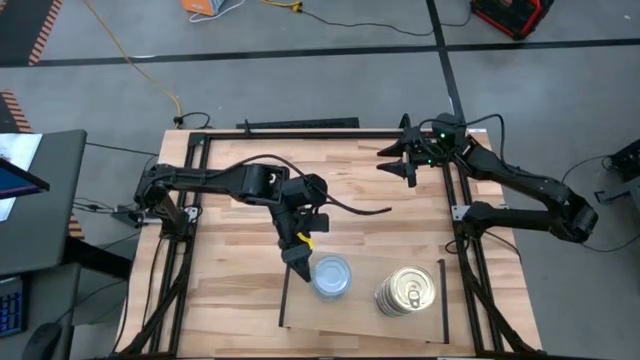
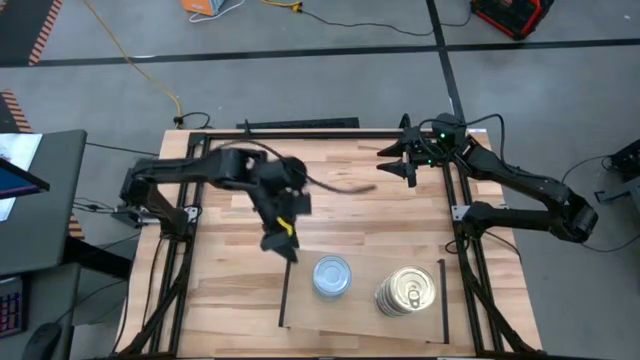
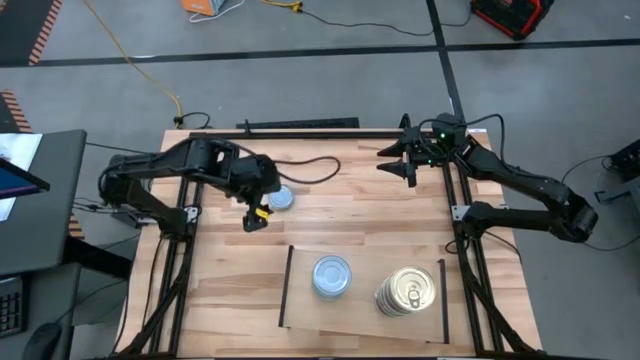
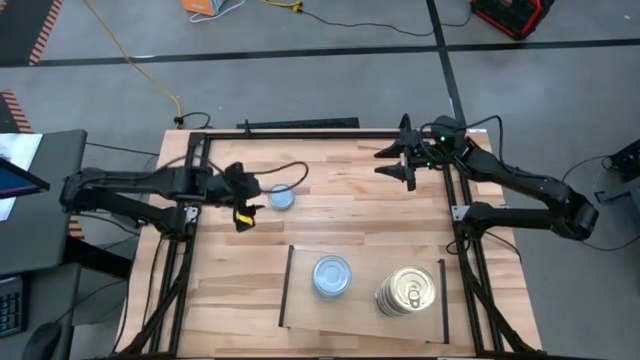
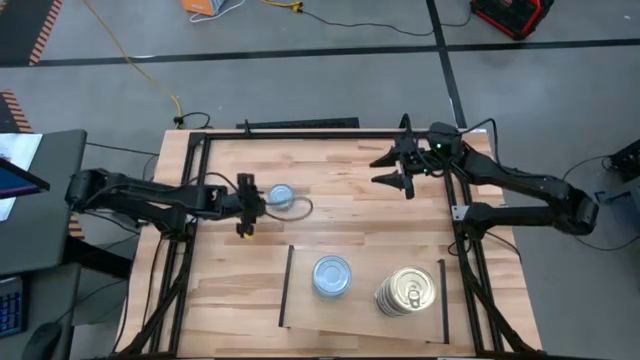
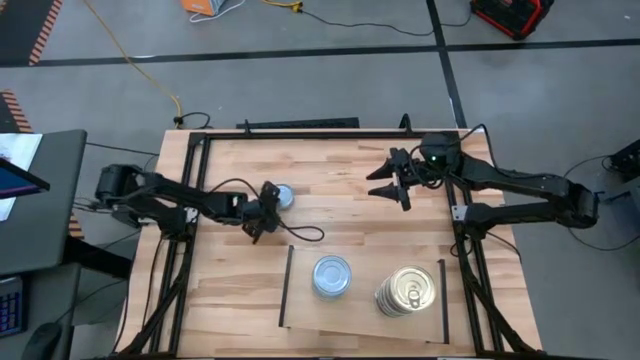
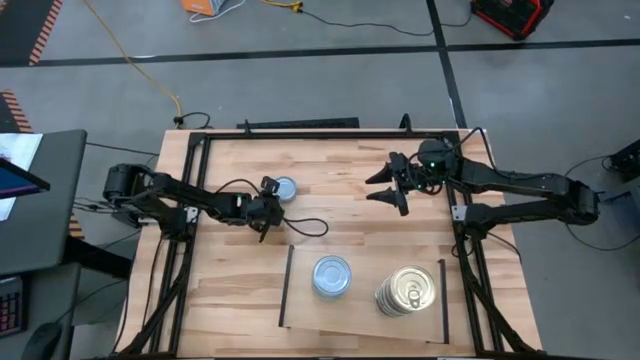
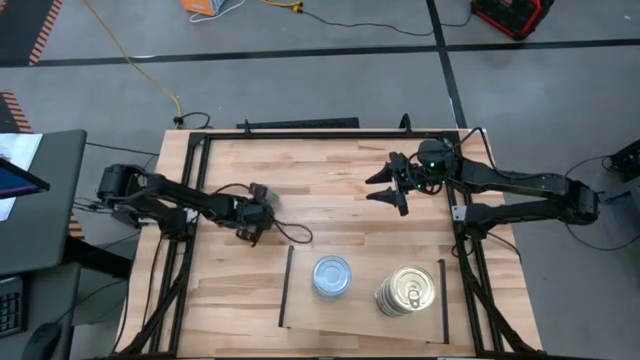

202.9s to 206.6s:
Task: Stack canned seafood by type on shelf
Stack the green tuna can on the top of the green tuna cans on the shelf

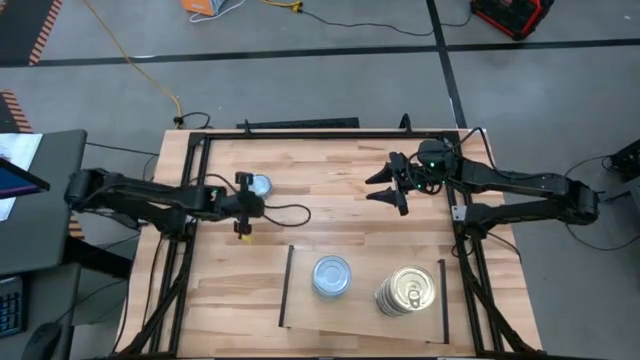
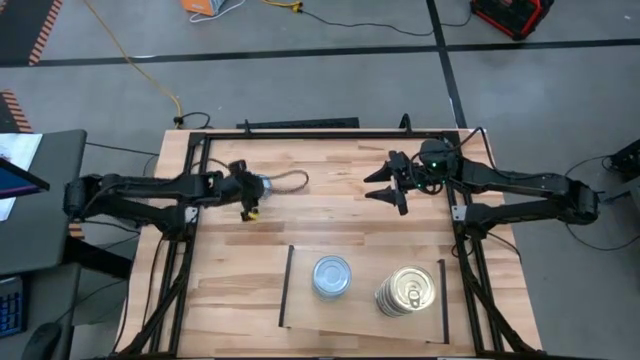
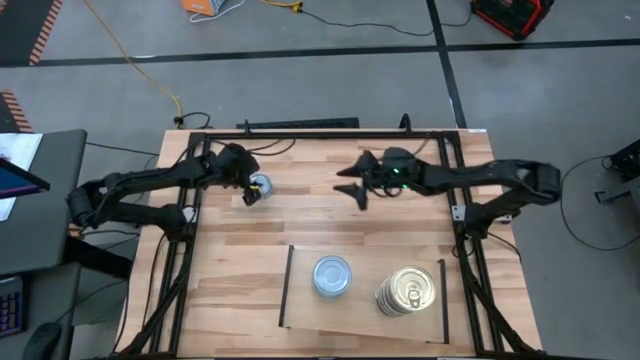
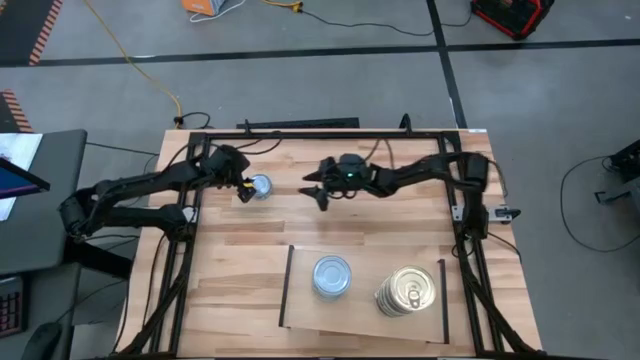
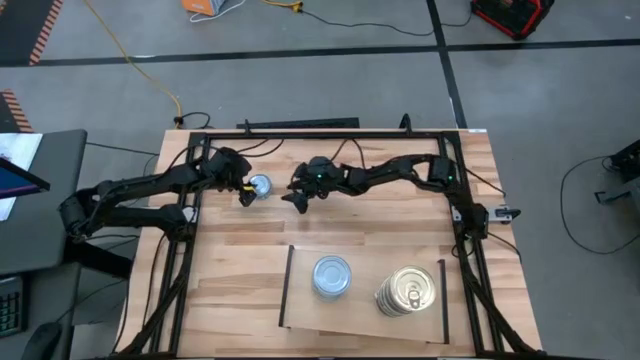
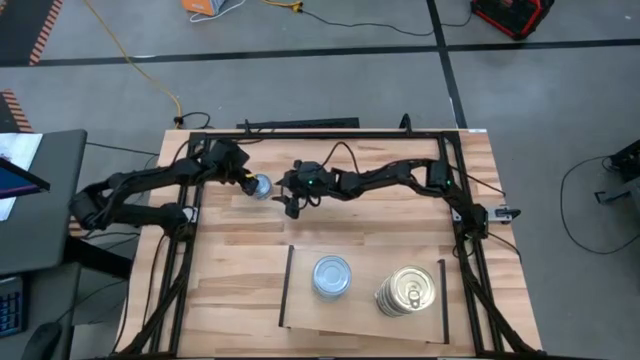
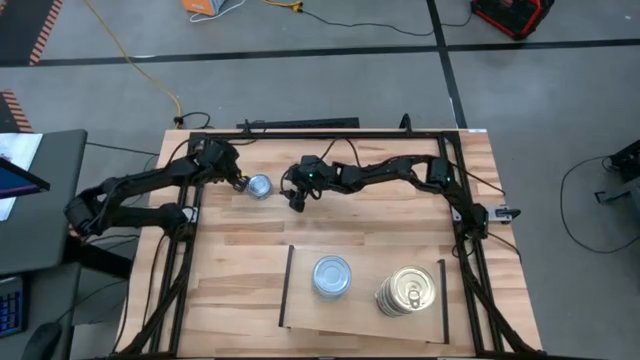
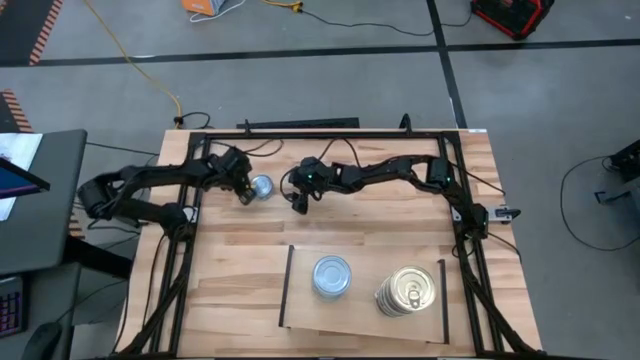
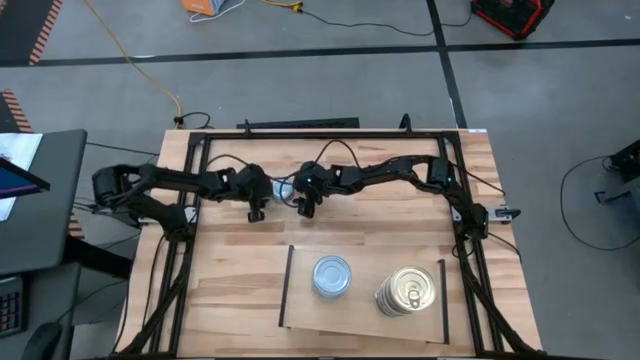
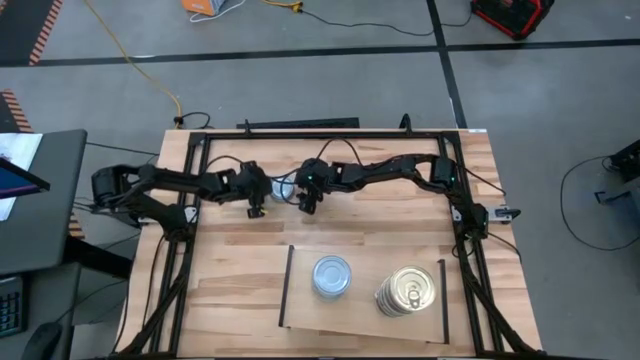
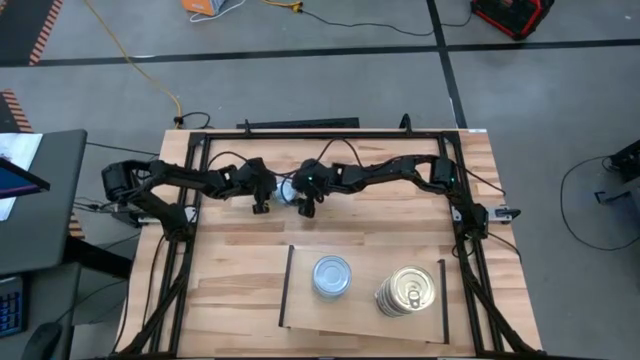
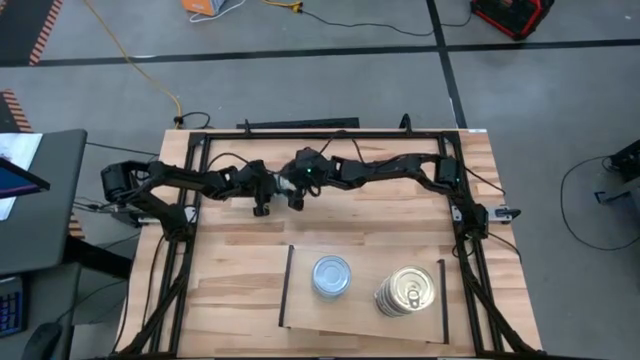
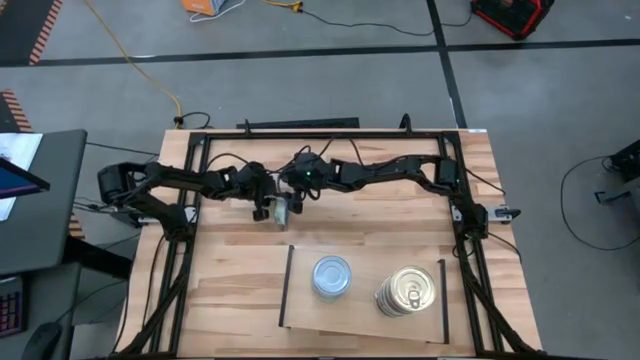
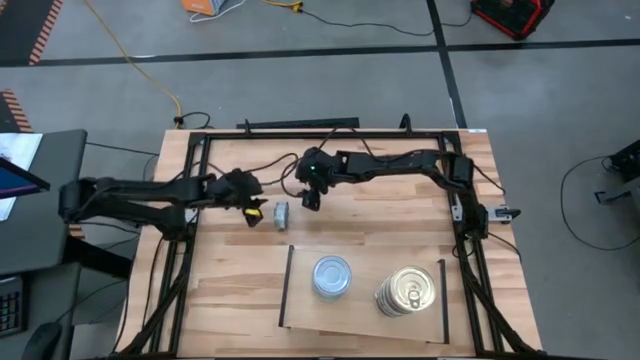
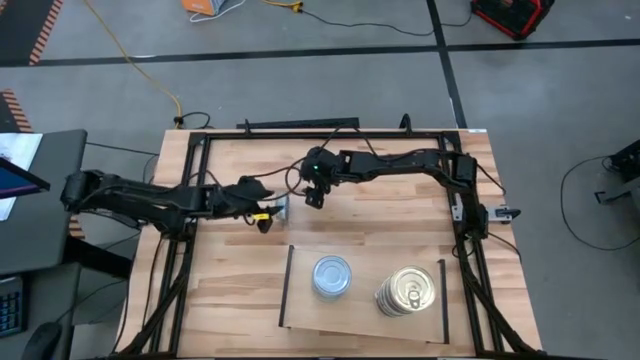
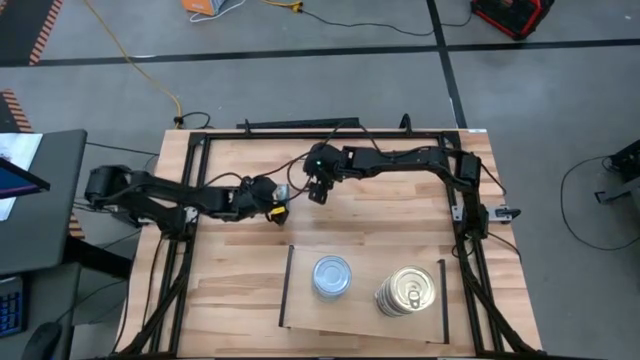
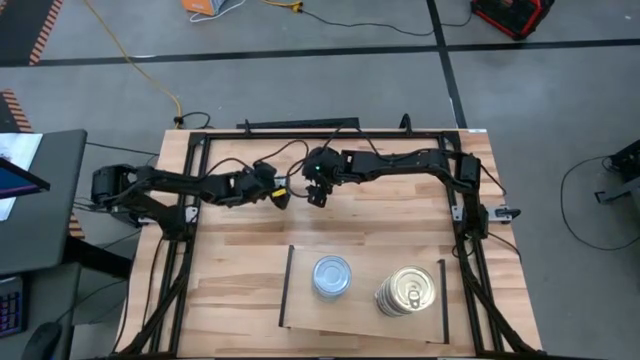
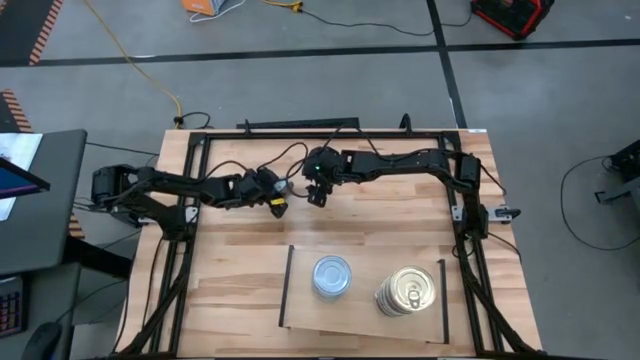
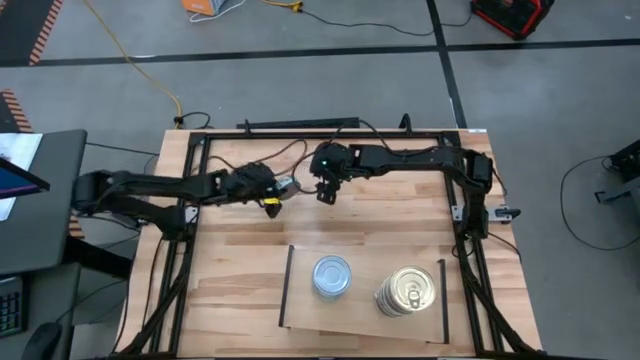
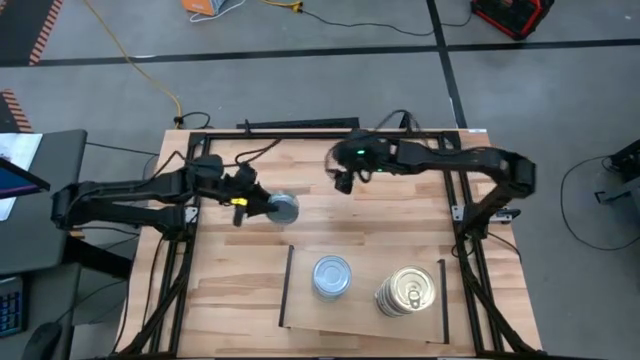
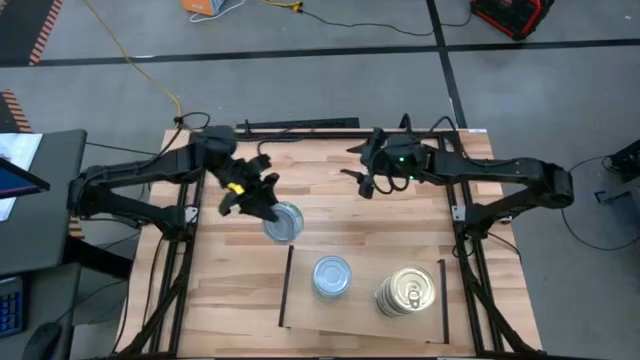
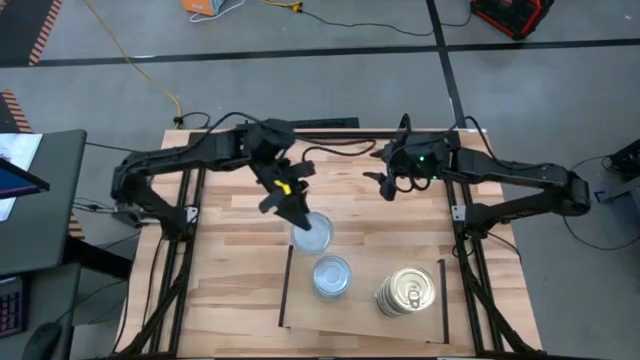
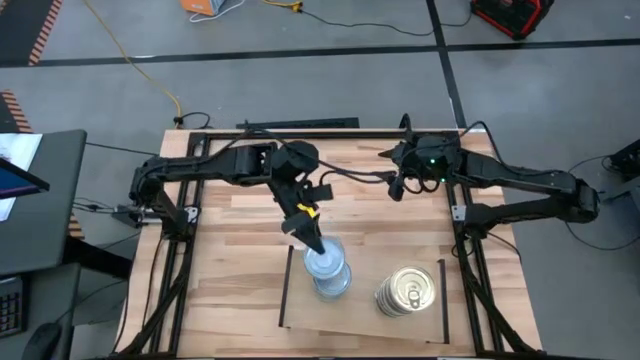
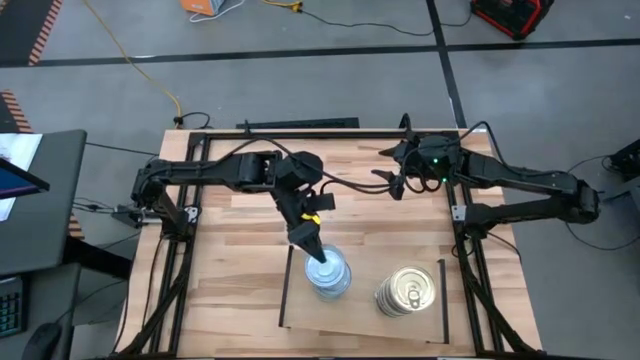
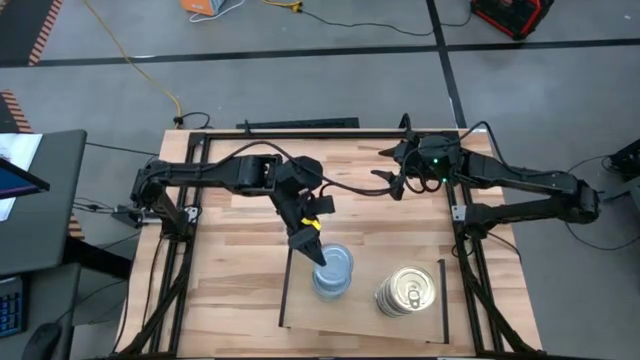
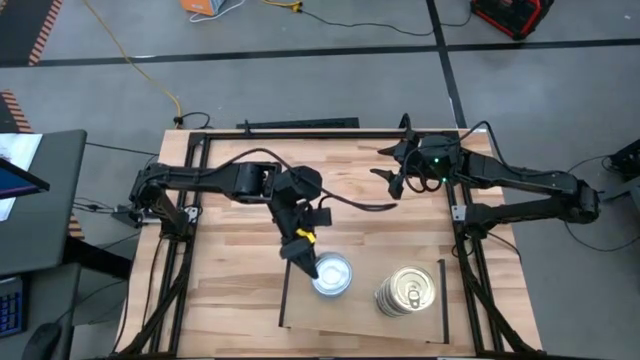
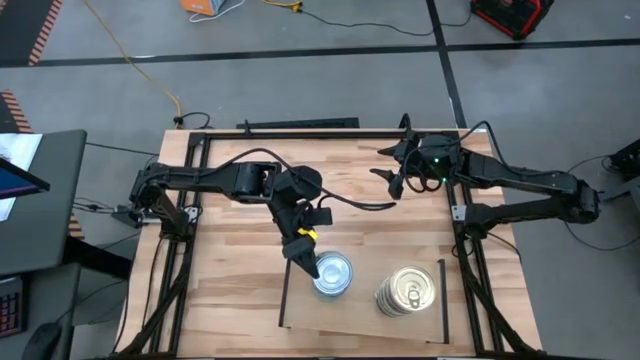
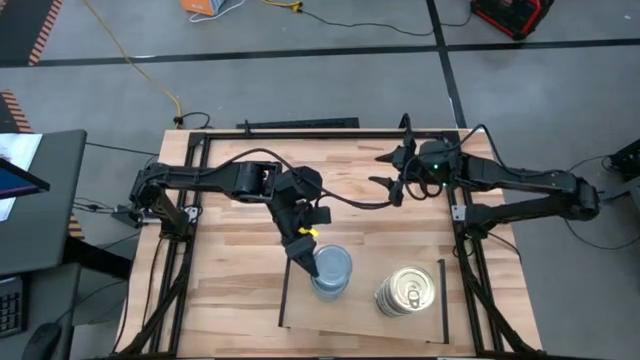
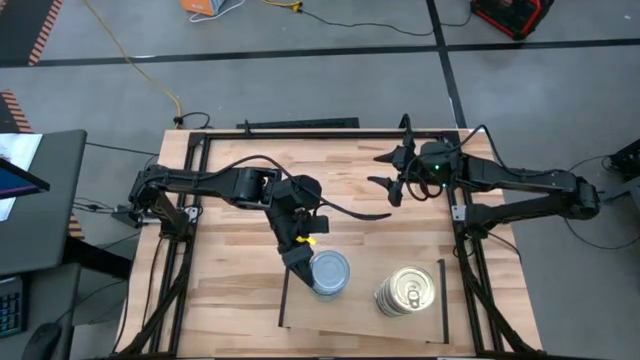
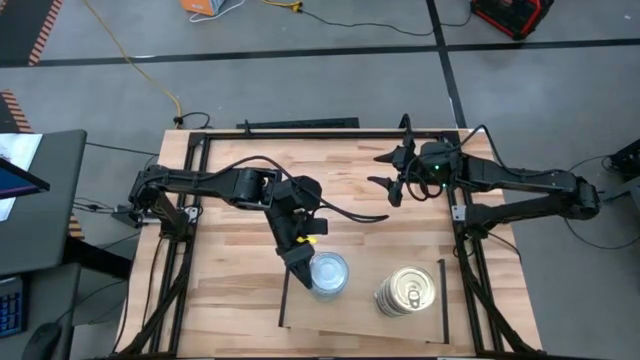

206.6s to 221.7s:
Stack the green tuna can on the top of the green tuna cans on the shelf

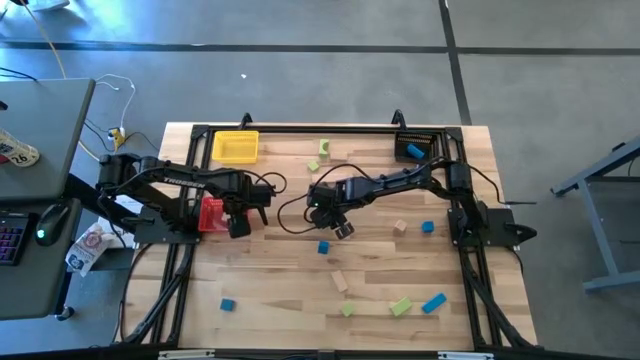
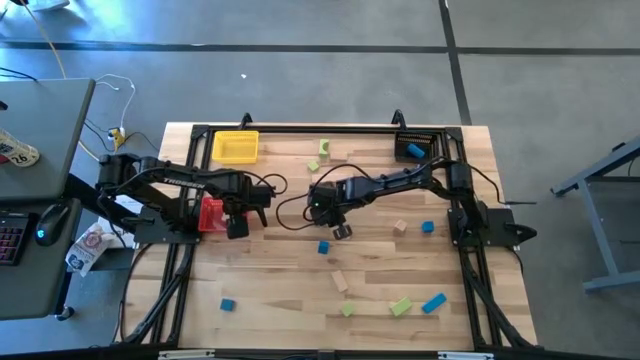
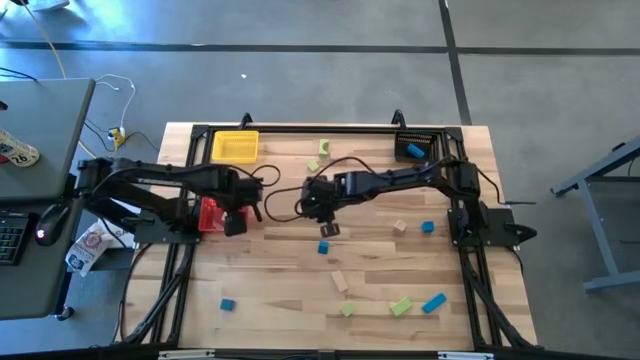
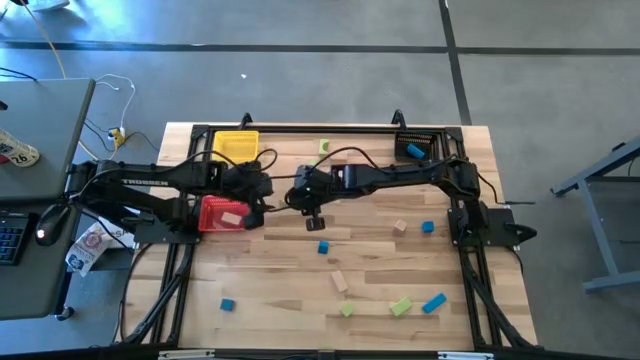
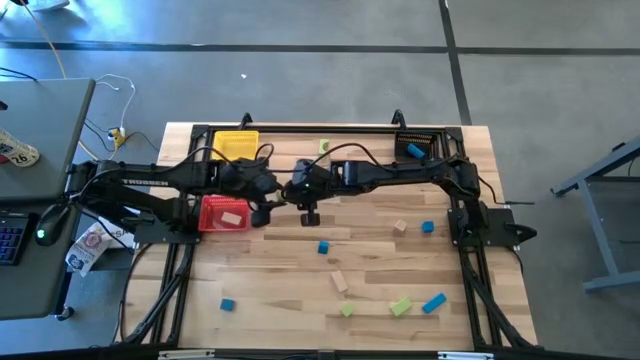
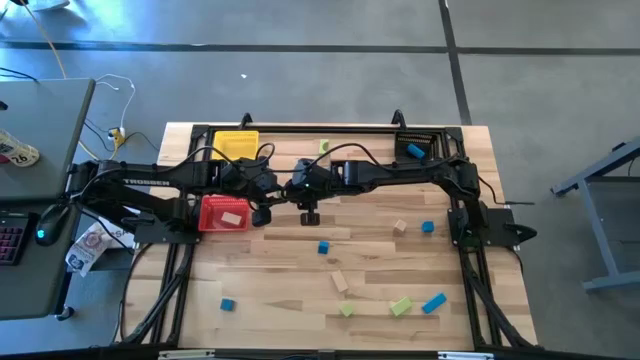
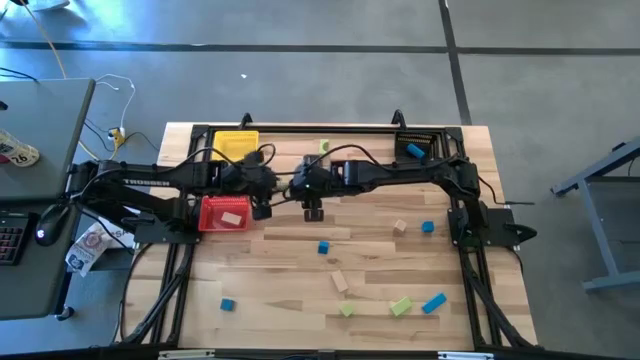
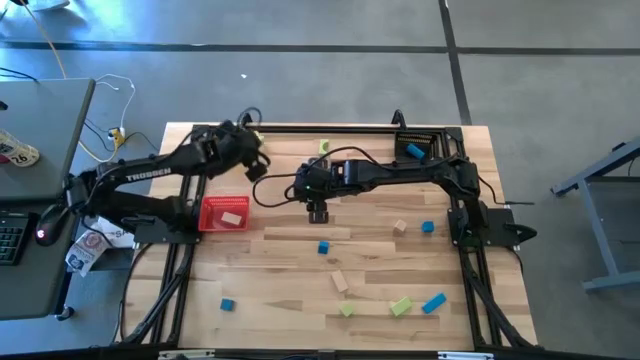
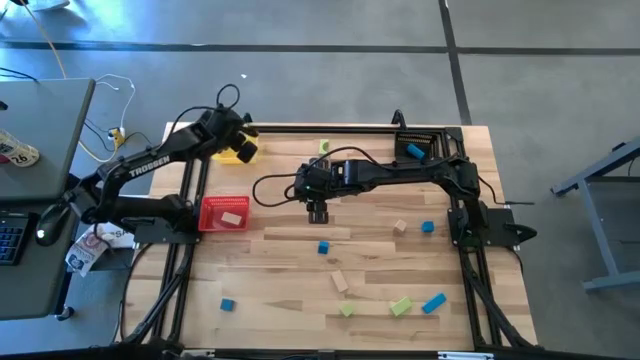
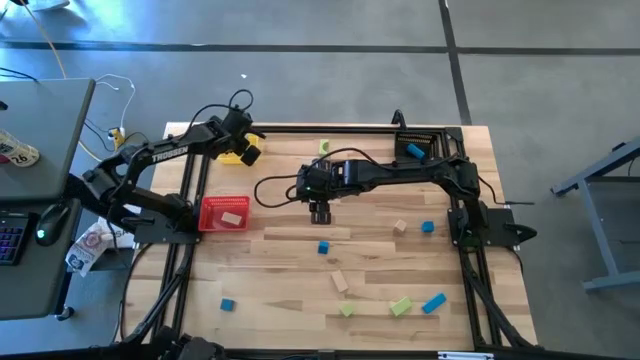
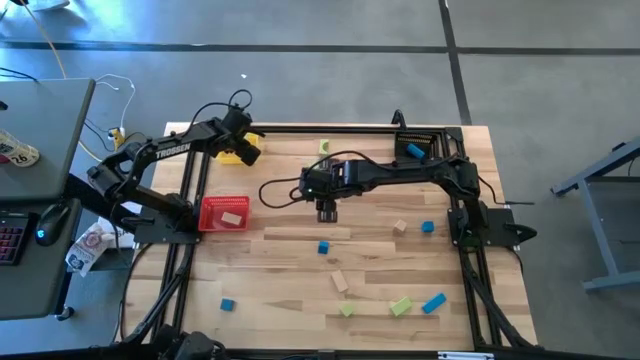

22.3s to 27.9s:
Task: Sort & place blocks by color
Put the green block into the yellow bin
